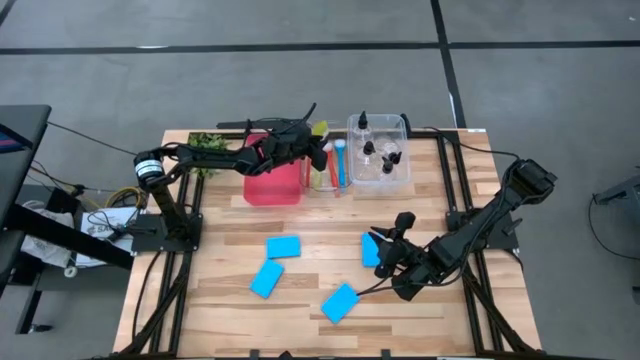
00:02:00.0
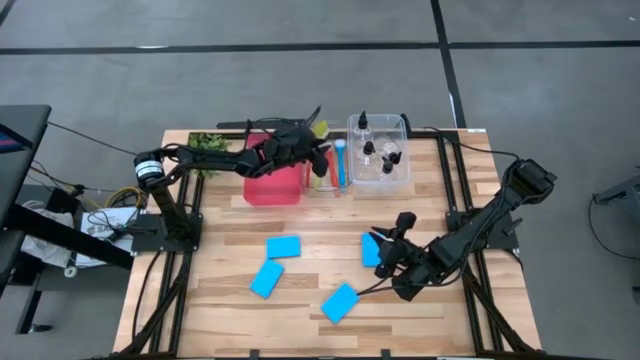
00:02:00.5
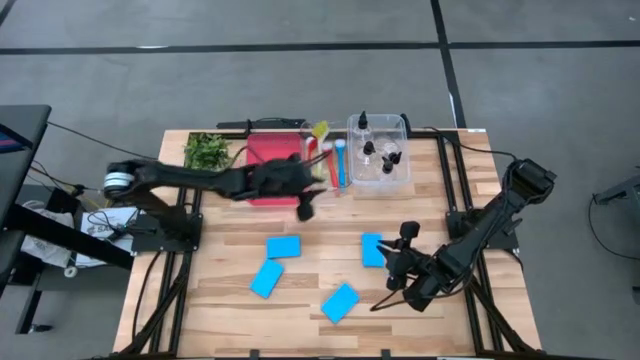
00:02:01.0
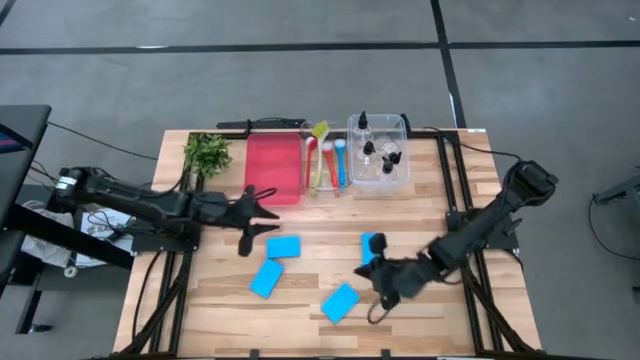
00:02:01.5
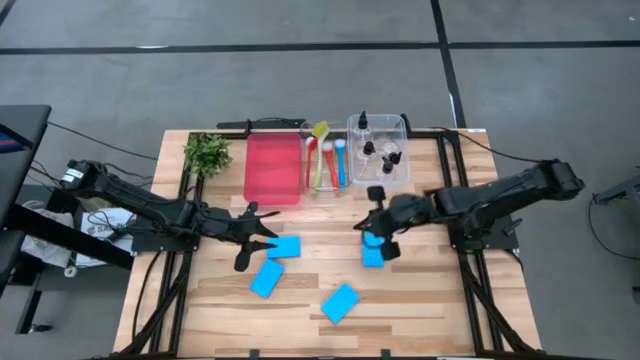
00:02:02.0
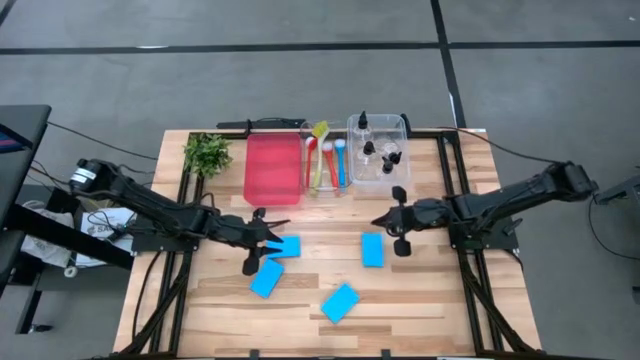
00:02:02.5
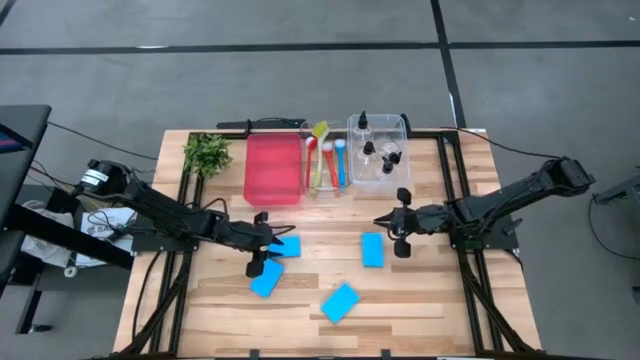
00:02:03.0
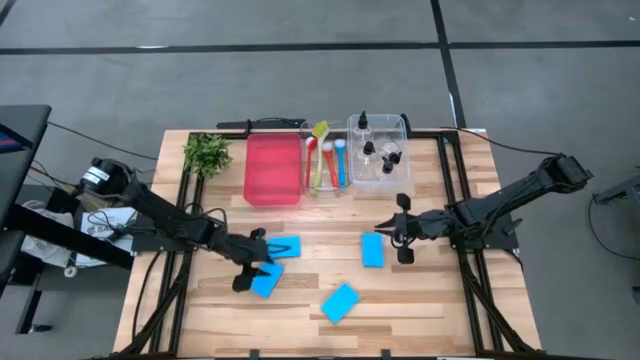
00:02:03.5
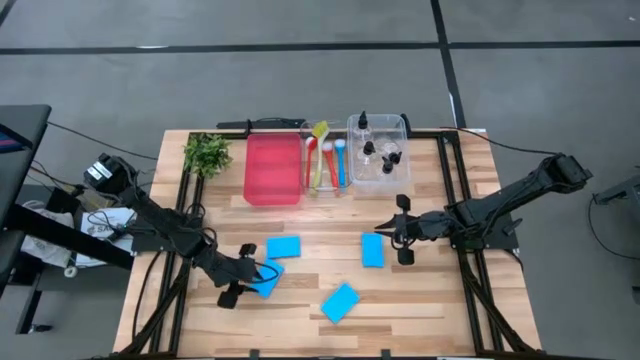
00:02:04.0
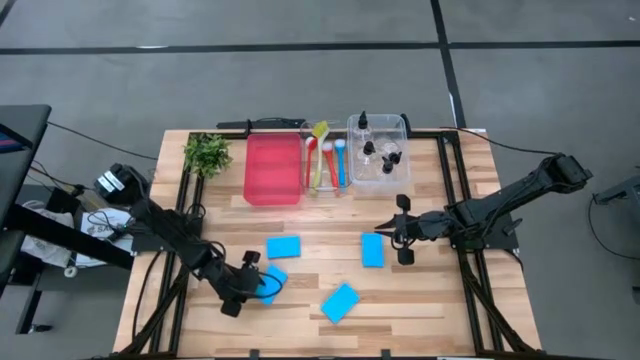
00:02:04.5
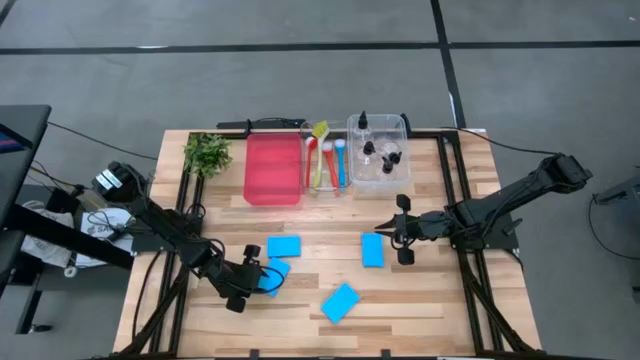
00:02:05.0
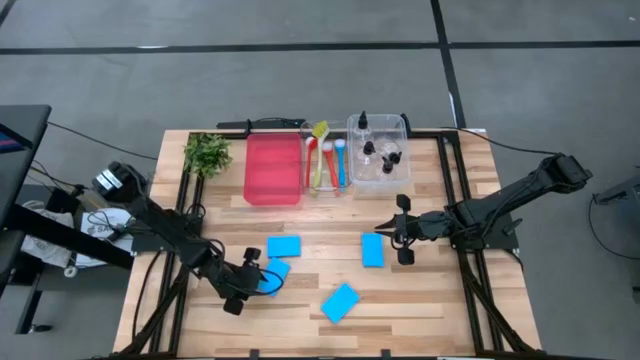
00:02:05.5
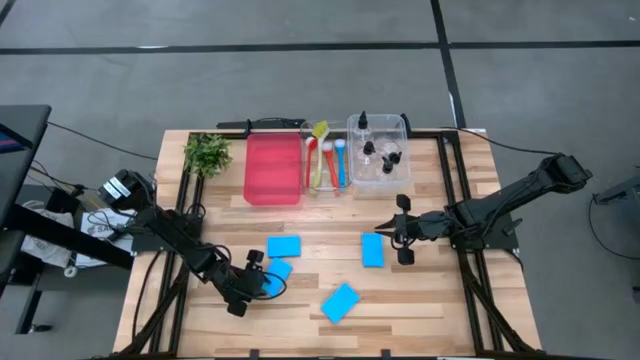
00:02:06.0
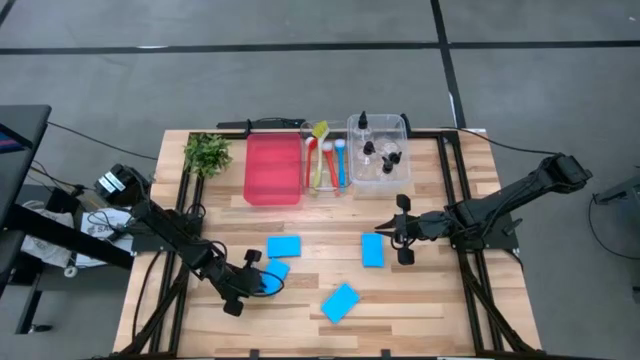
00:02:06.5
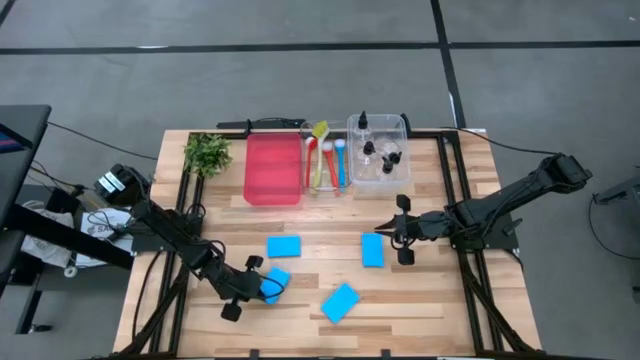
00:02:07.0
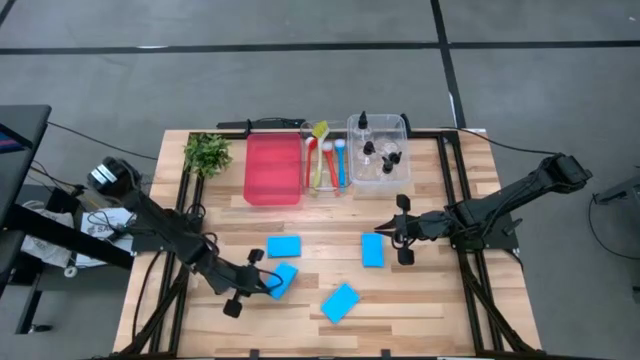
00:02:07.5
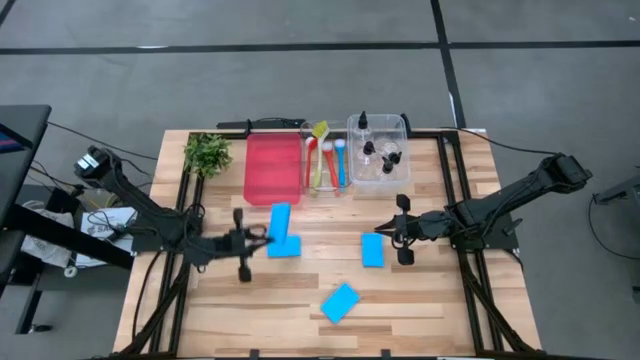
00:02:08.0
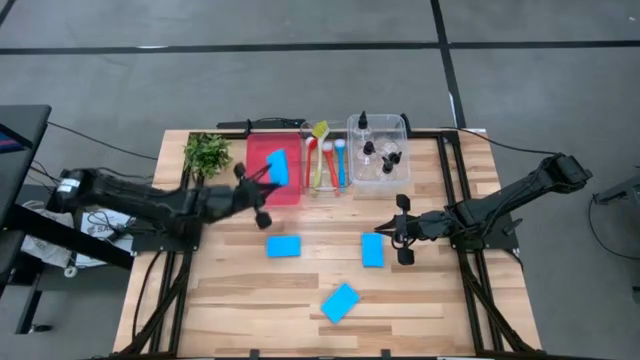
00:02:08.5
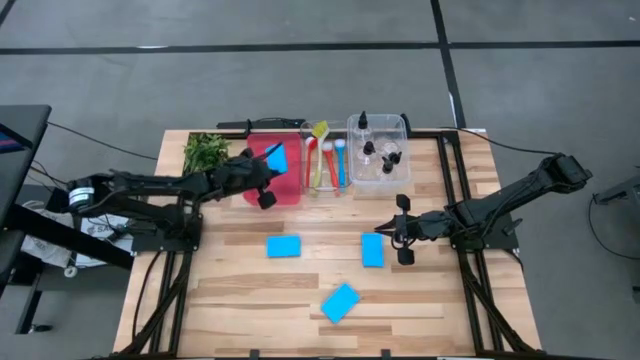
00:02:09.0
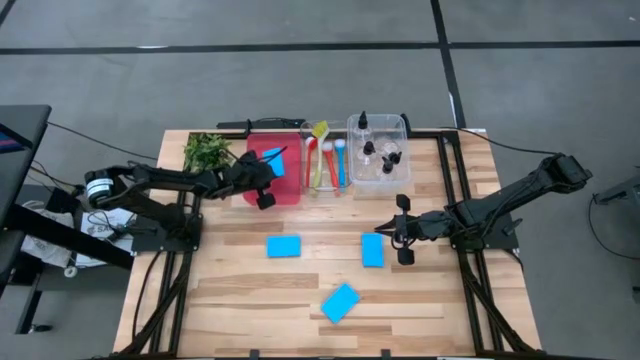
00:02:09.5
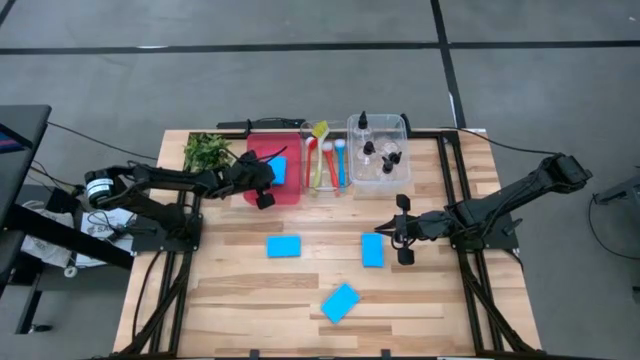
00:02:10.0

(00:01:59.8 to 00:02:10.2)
Task: Pick & Place Kitchen Sink Supplies
Put the bottom left blue sponge into the red bin

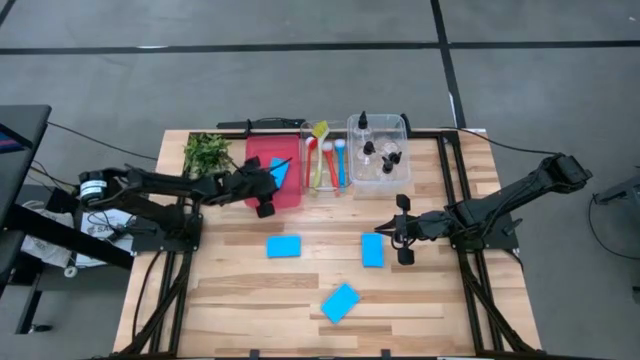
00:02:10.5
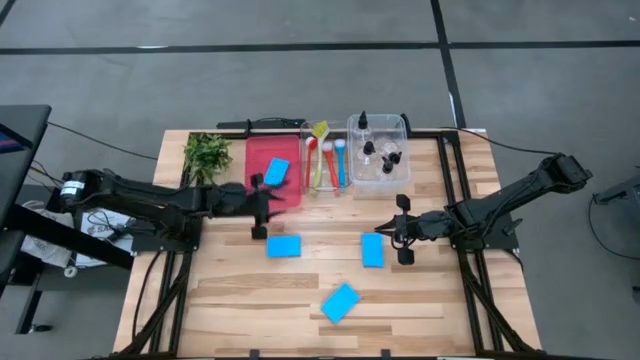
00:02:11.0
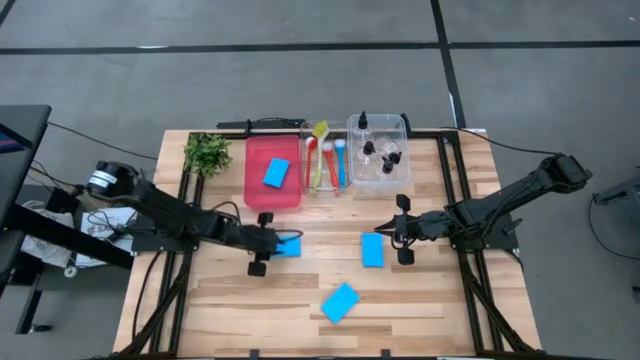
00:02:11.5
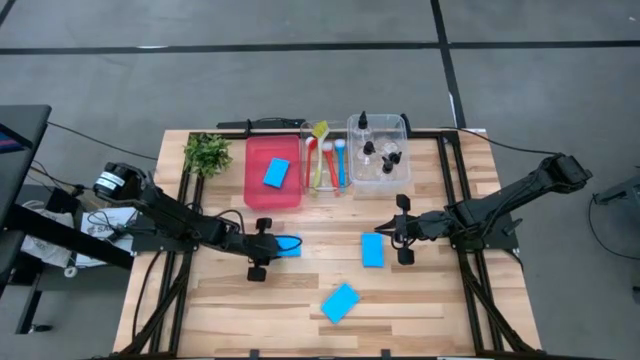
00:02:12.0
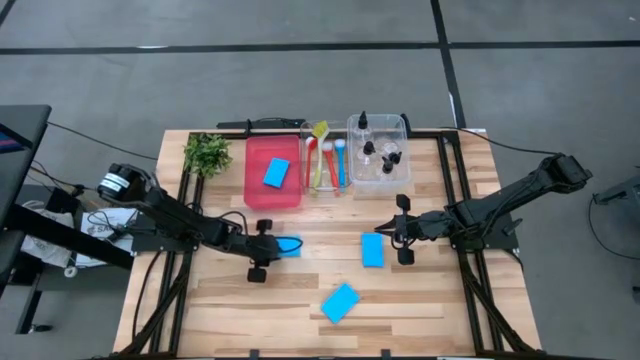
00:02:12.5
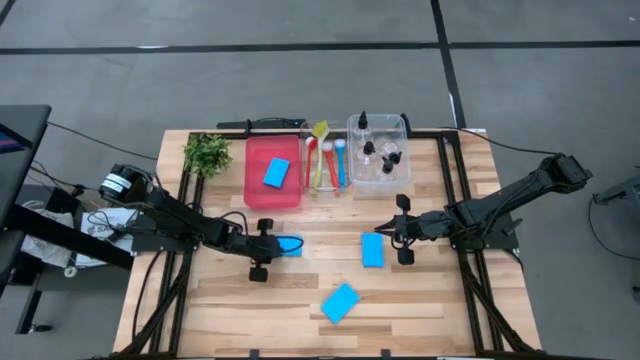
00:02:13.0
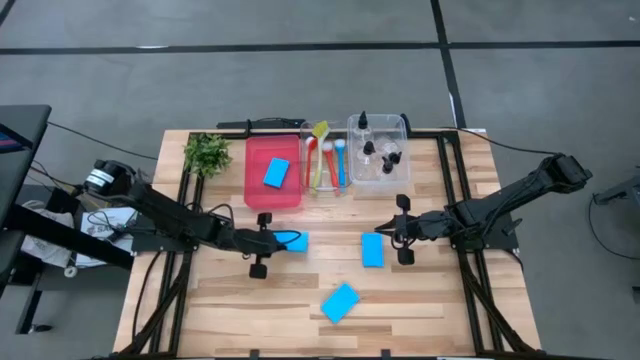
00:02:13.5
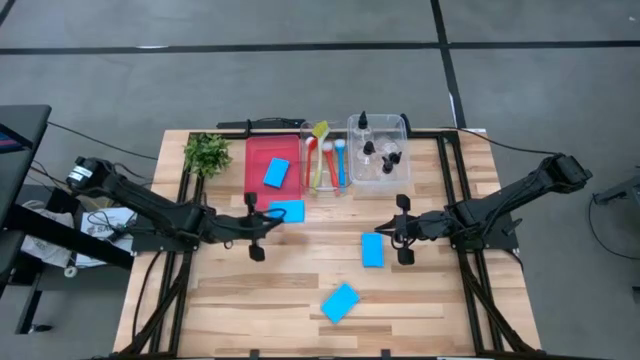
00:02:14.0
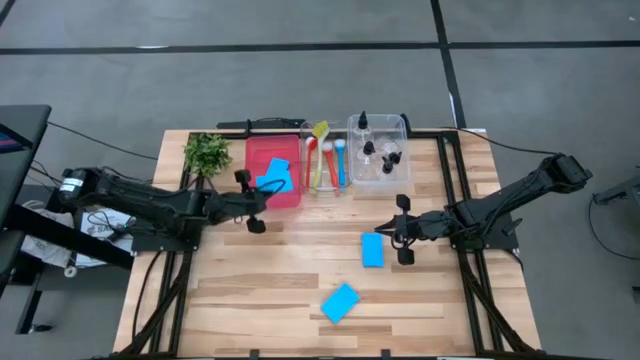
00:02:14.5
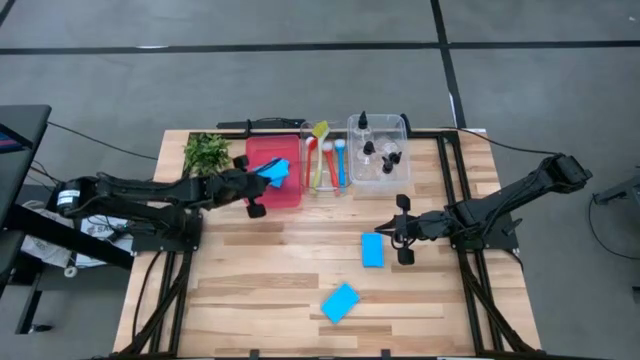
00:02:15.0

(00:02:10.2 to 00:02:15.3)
Put the top left blue sponge into the red bin

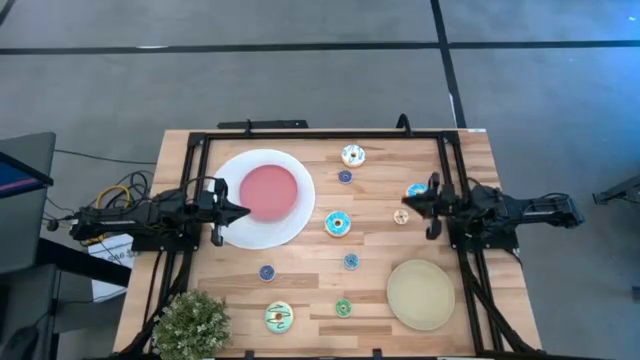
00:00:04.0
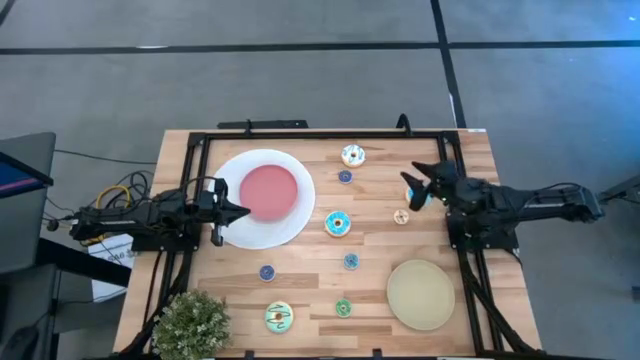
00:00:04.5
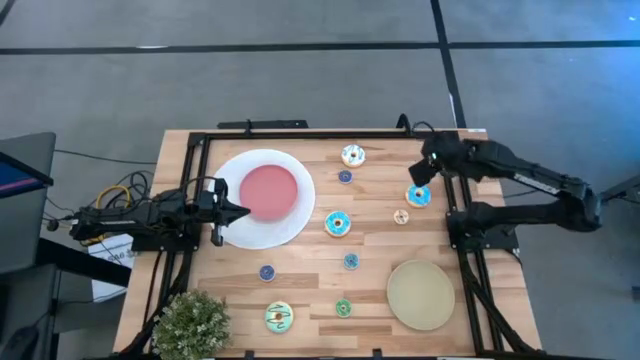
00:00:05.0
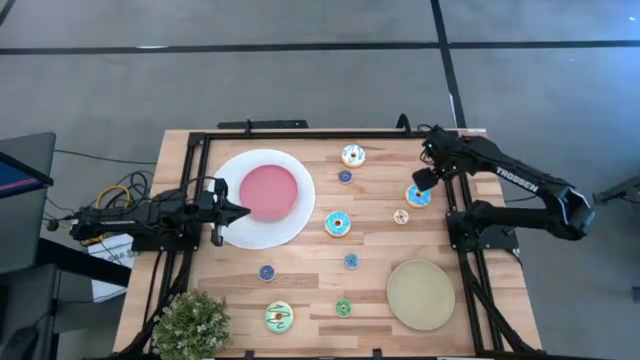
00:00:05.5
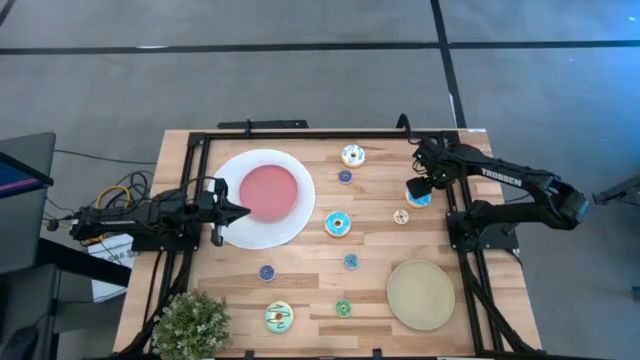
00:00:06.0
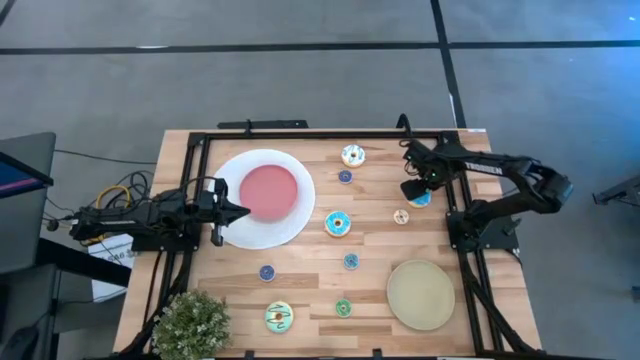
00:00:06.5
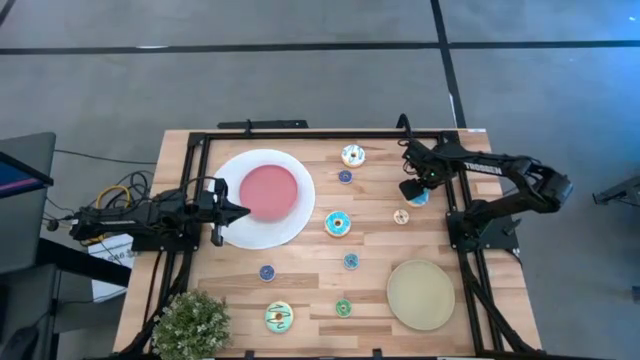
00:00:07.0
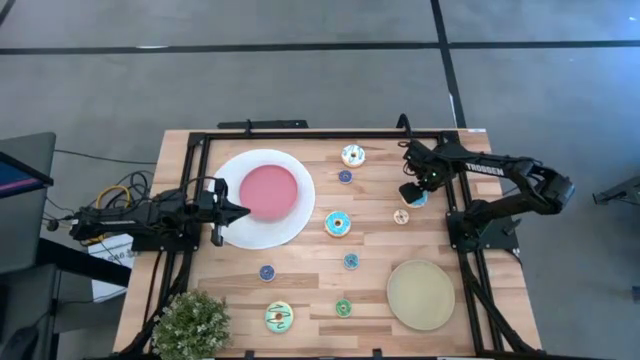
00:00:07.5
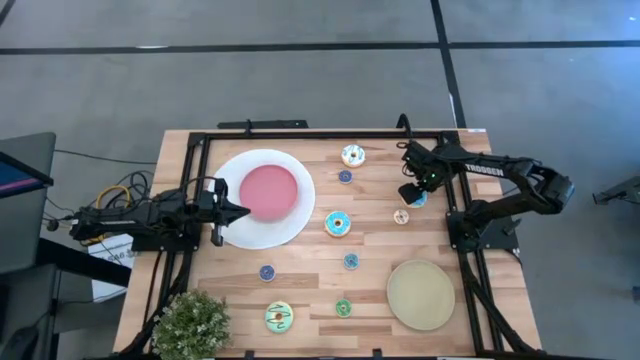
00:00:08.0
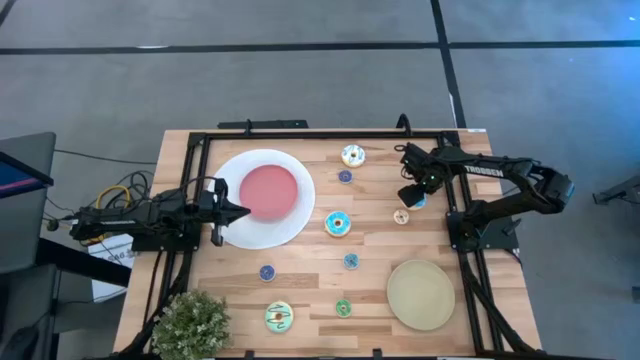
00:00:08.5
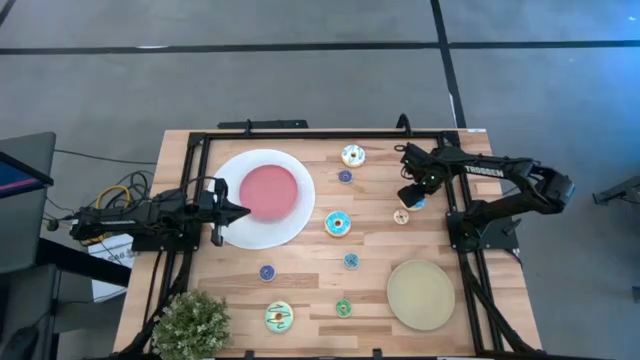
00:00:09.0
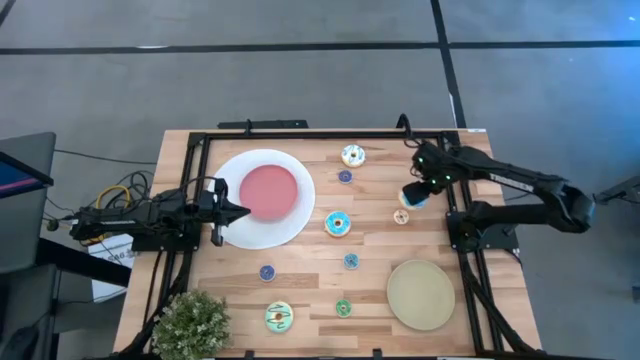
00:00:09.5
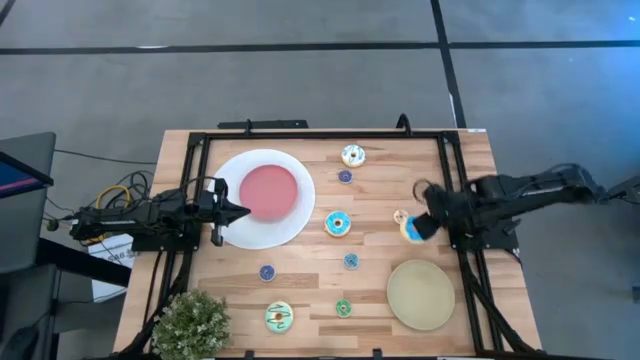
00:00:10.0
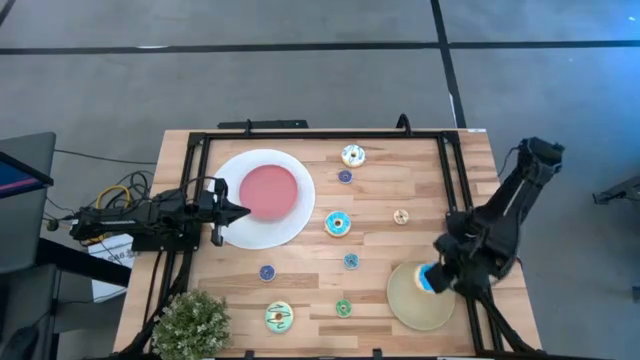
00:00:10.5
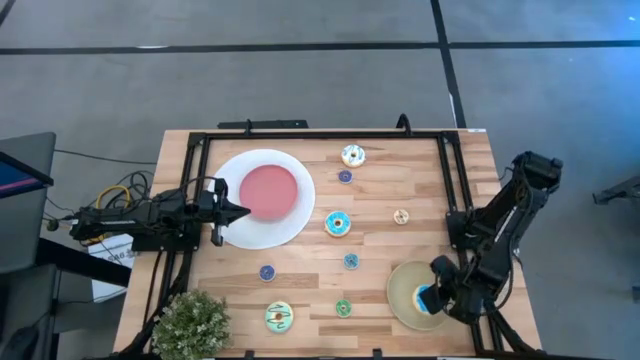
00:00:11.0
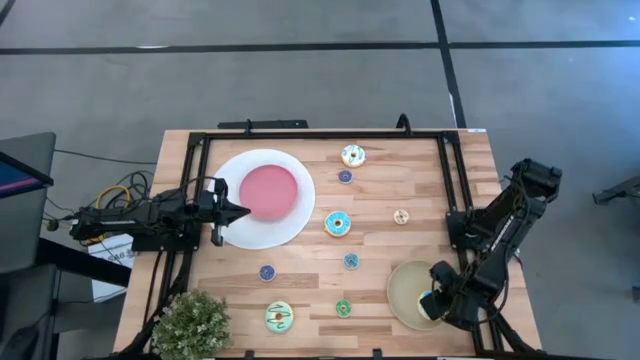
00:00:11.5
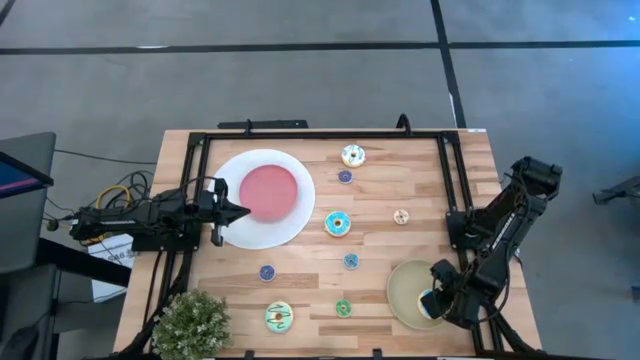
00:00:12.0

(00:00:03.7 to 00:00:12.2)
Task: Pick & Place donuts
Put the large light blue donut onto the brown plate
